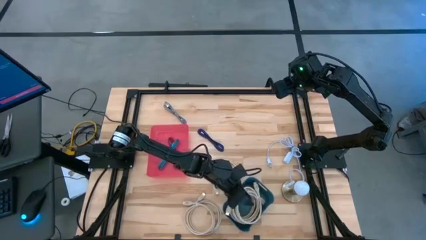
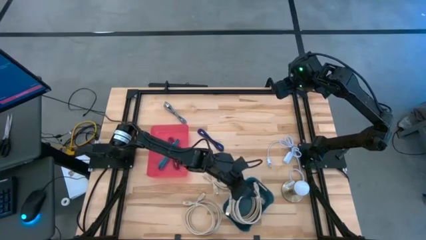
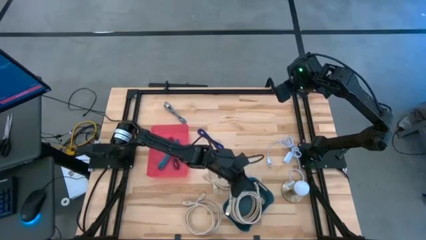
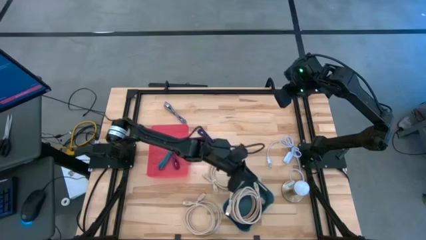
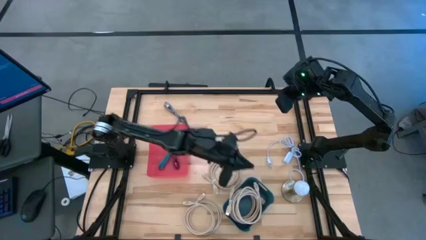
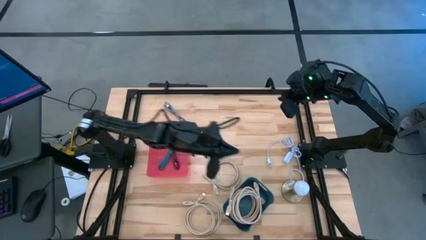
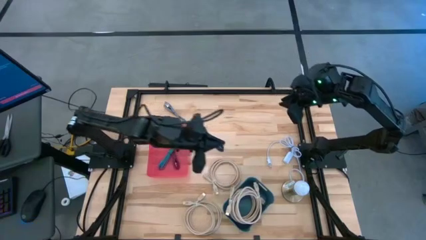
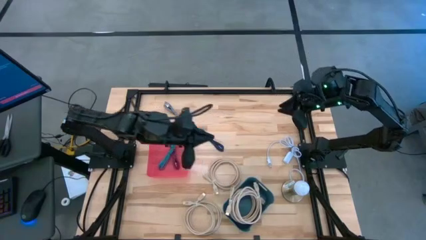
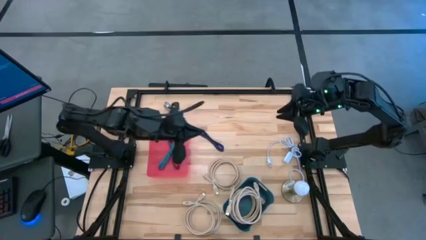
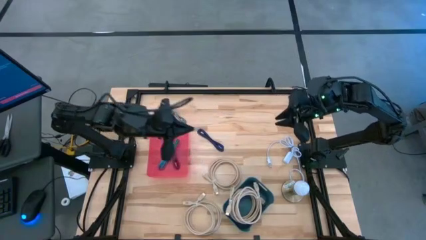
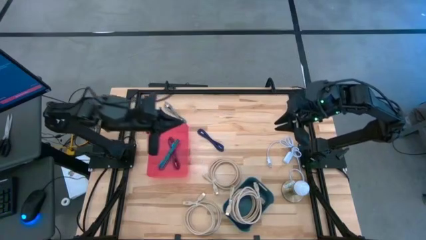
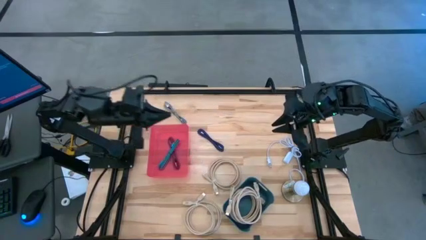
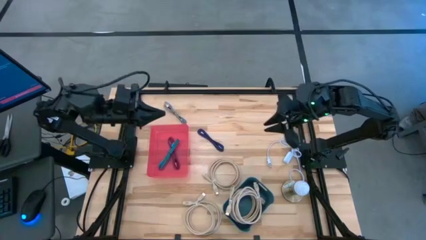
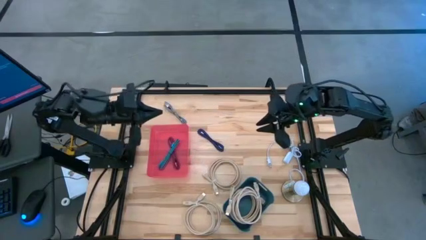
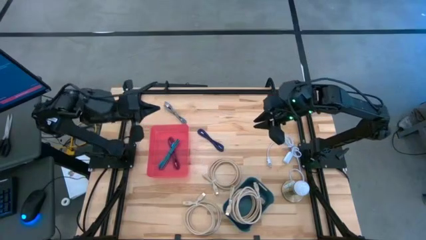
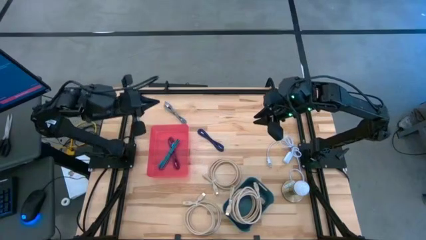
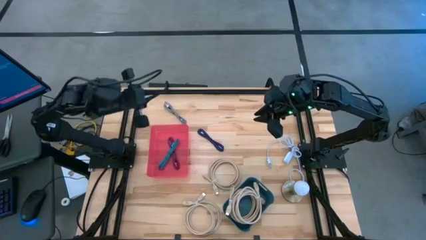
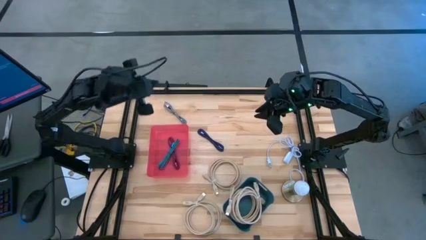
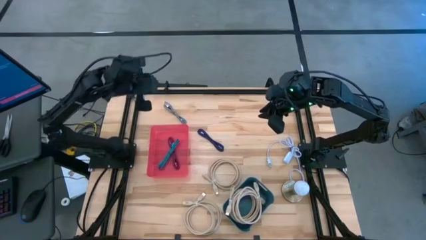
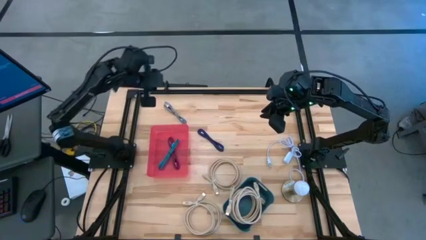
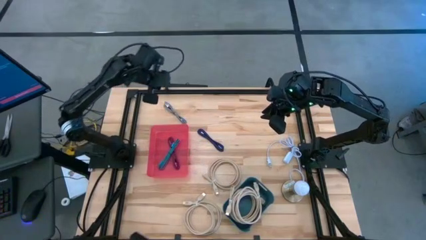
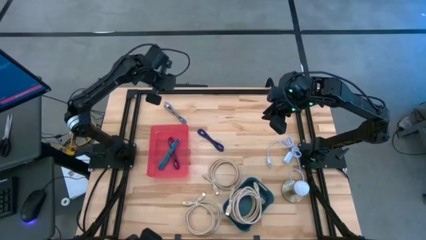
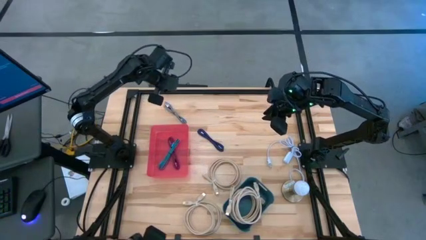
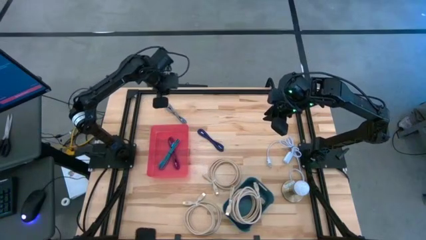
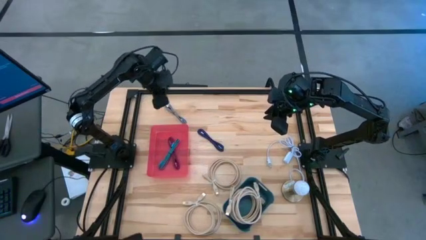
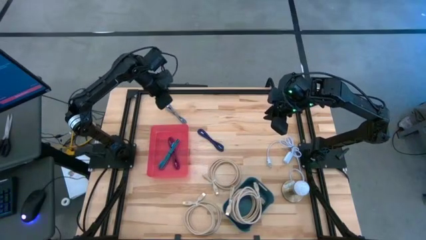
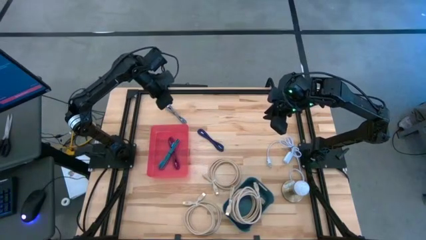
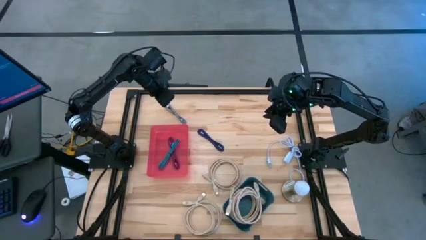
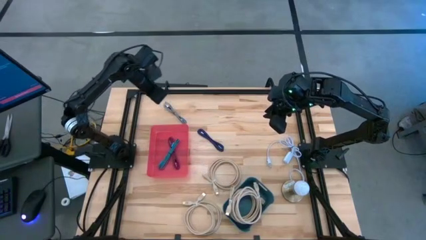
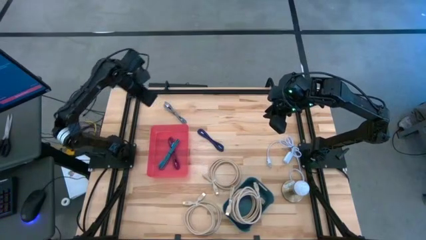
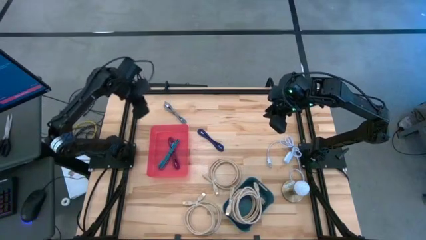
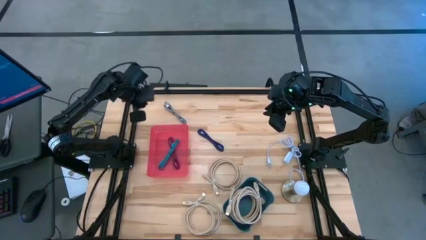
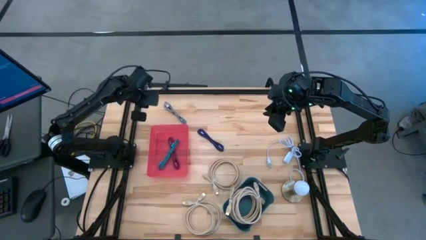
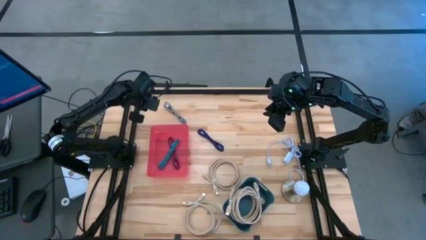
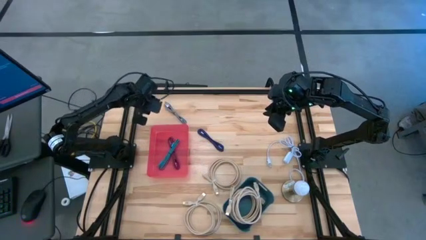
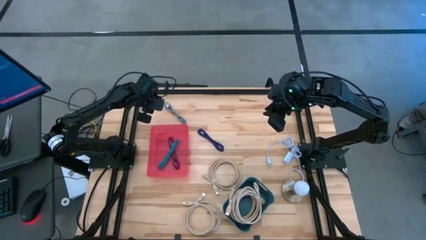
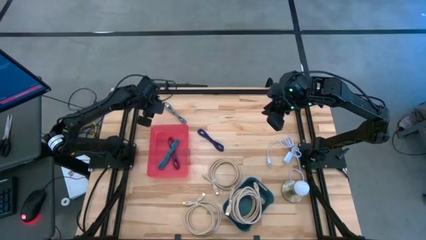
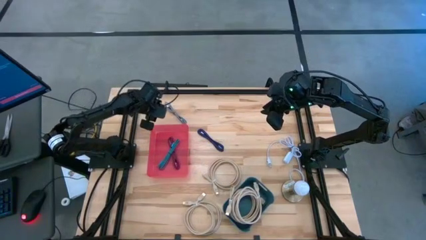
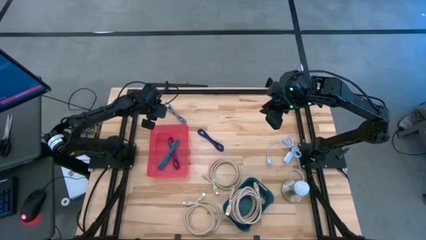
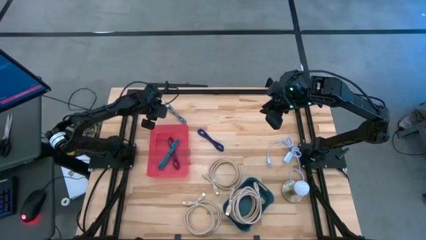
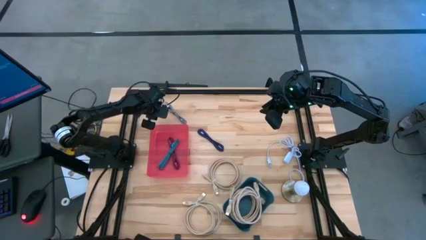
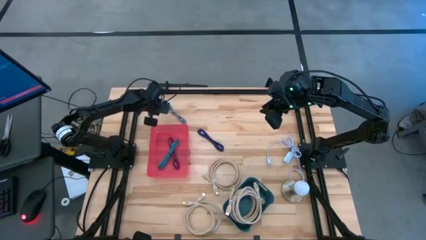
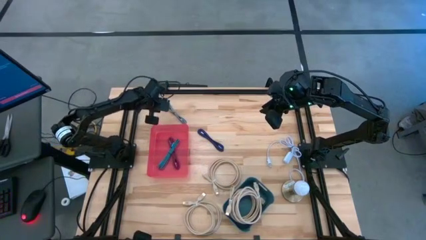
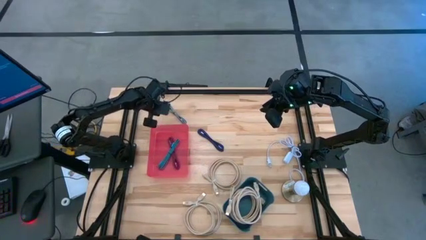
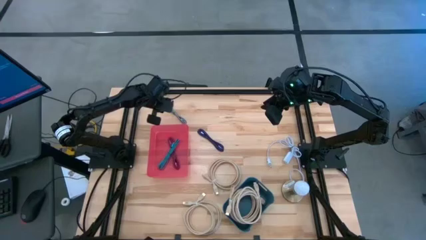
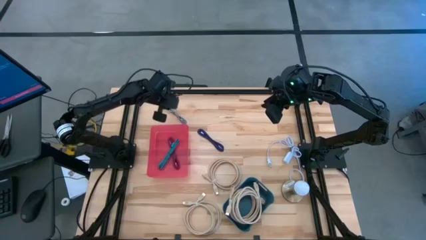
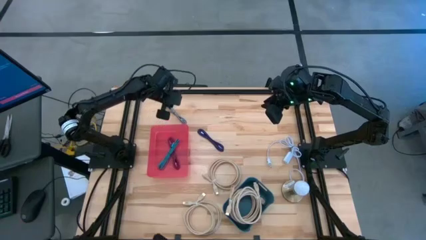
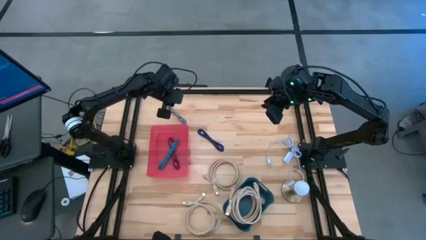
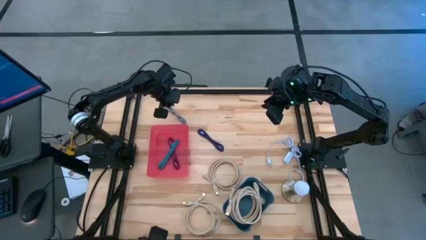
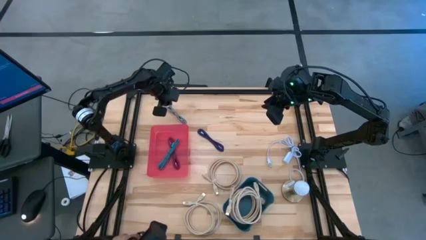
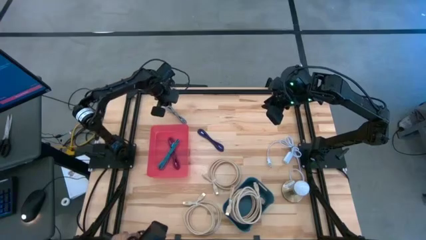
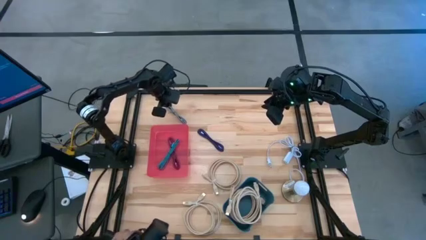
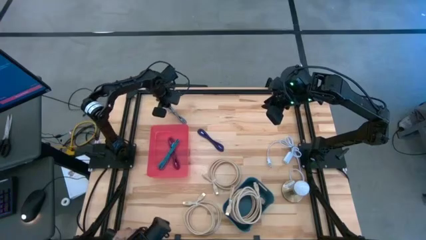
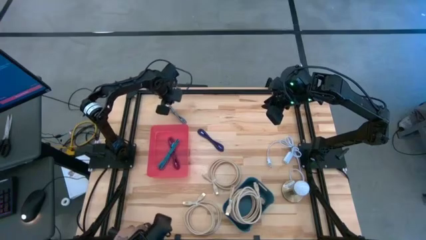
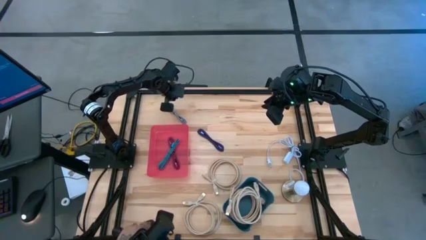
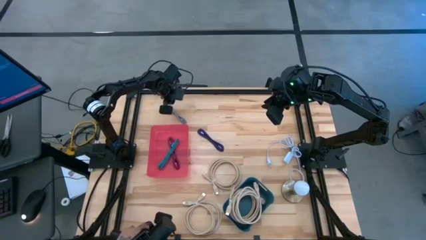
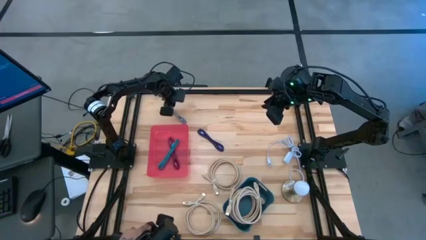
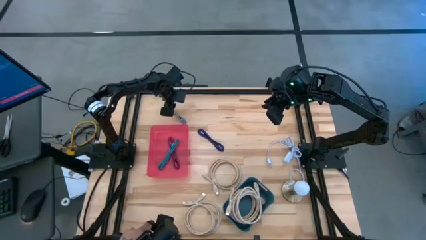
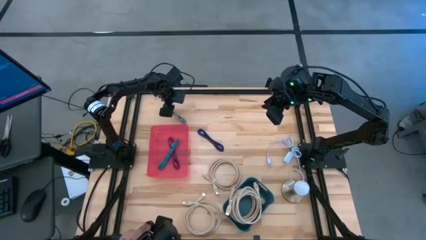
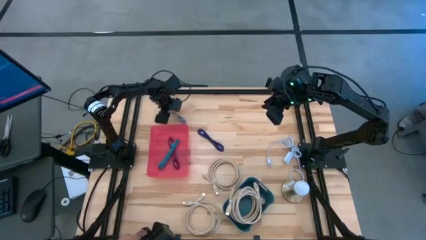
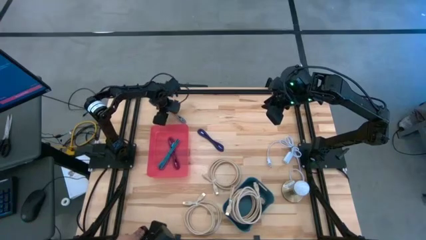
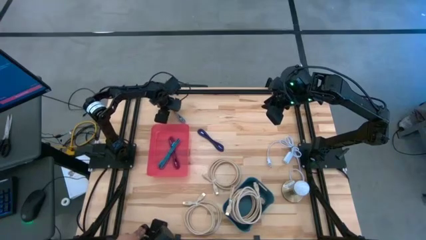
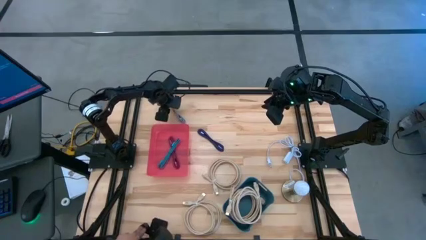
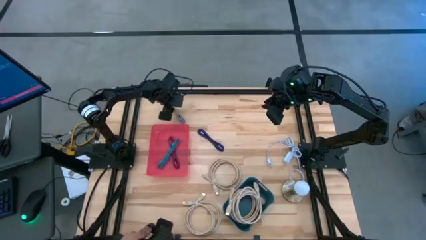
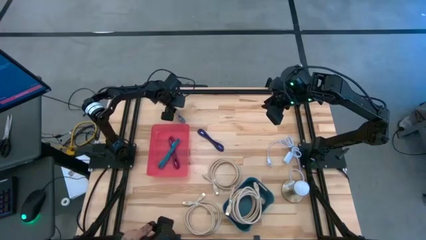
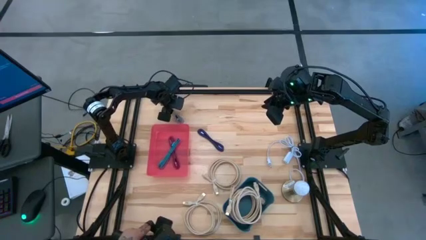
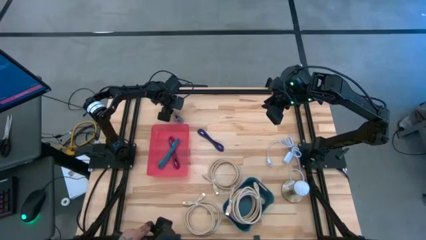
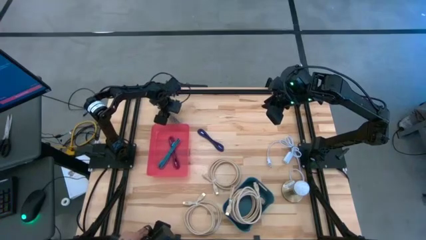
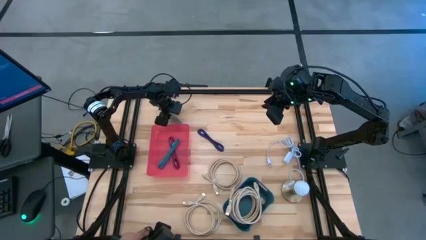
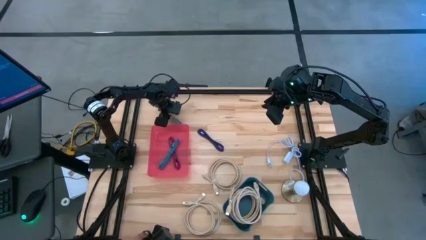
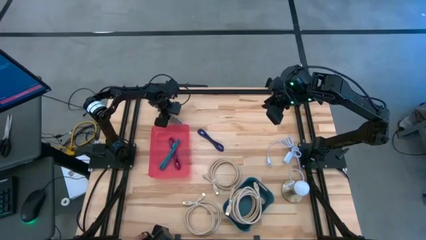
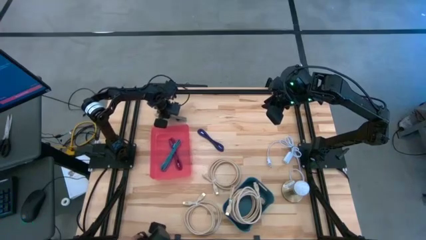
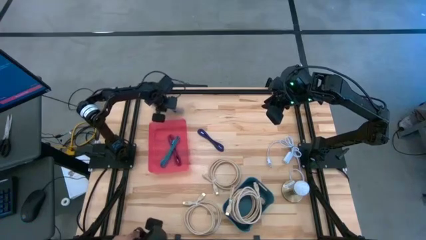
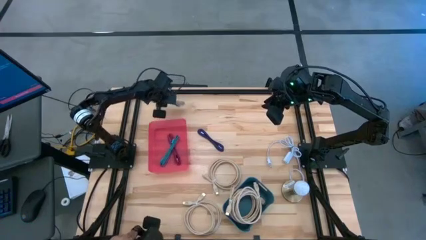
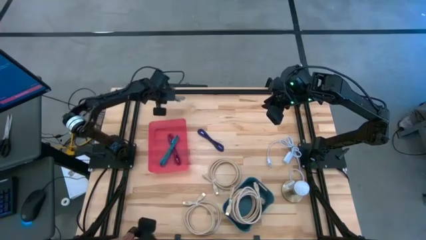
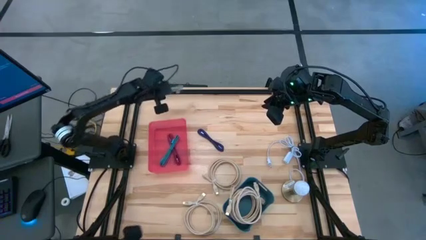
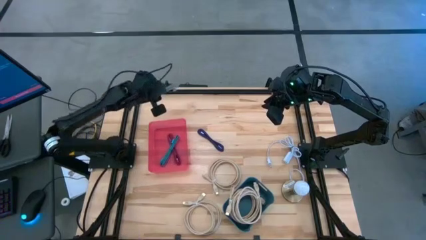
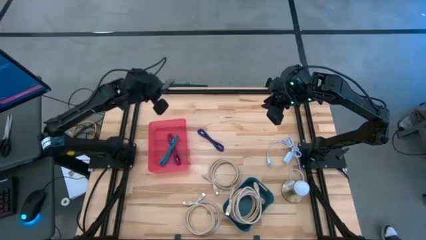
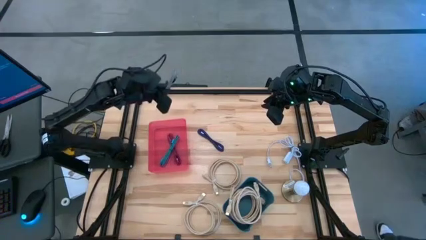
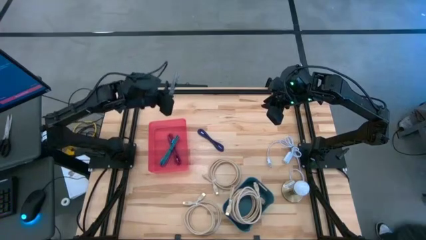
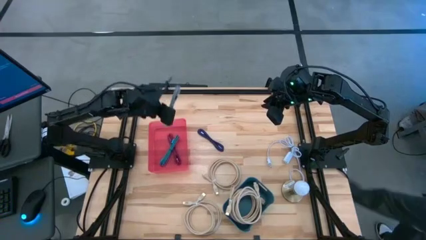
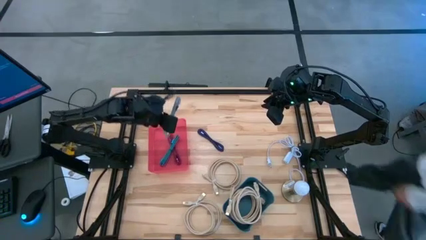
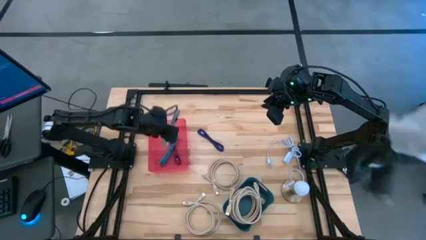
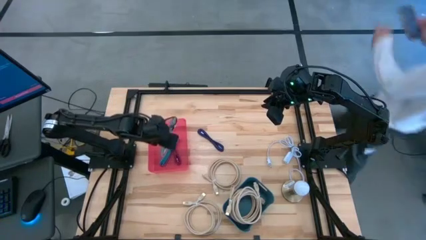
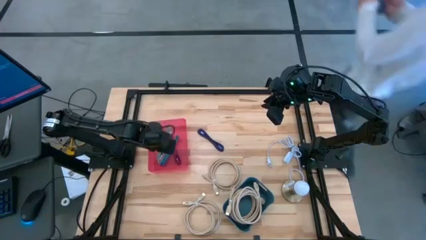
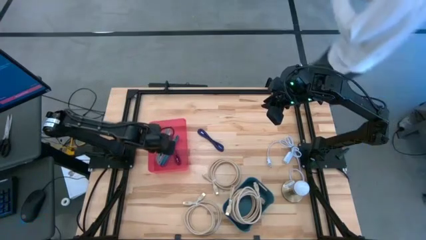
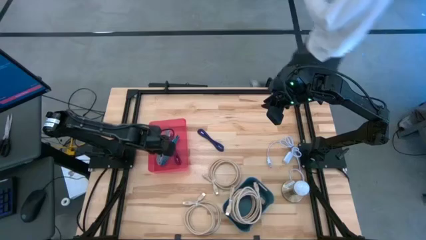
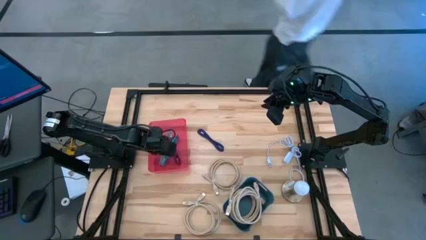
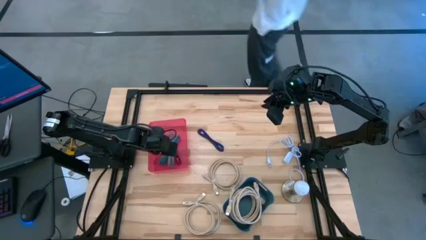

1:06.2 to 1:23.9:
Task: Pick & Place USB Port
Put the gray charger cable into the red bin
